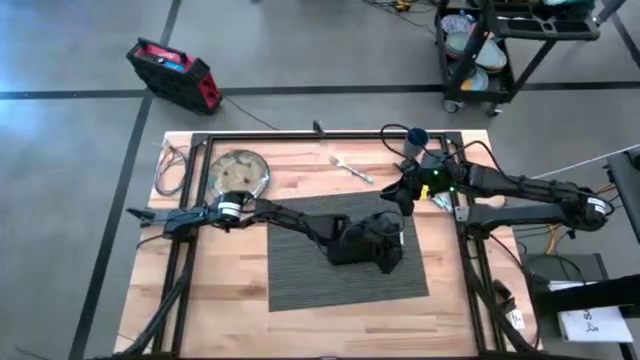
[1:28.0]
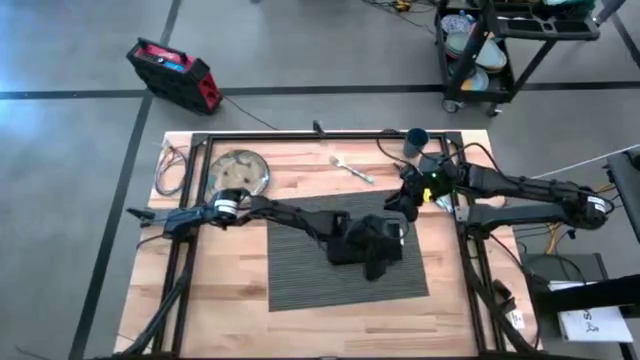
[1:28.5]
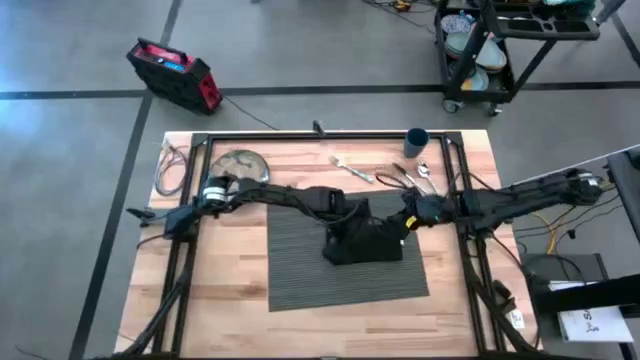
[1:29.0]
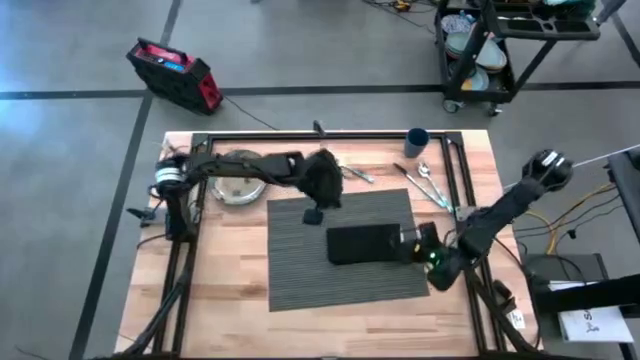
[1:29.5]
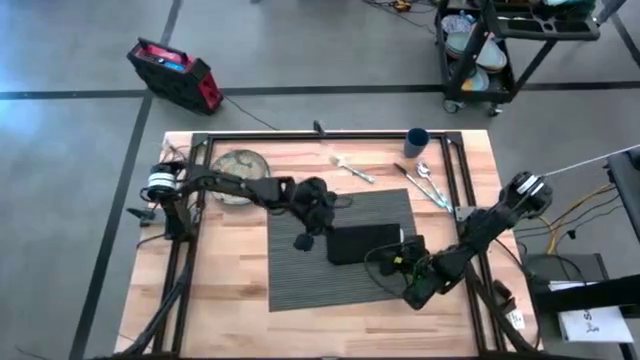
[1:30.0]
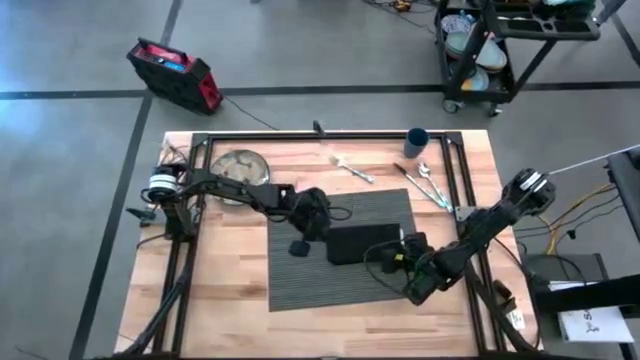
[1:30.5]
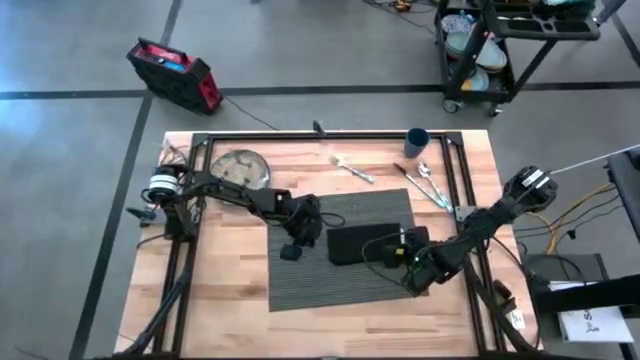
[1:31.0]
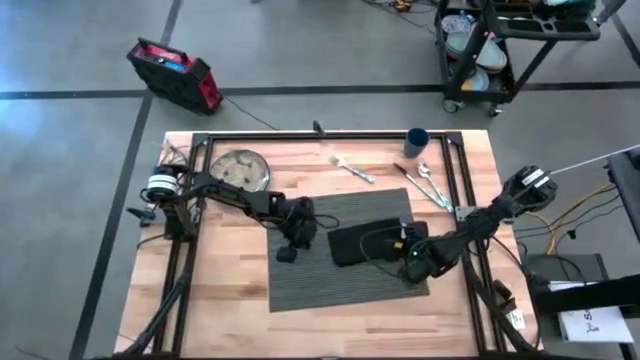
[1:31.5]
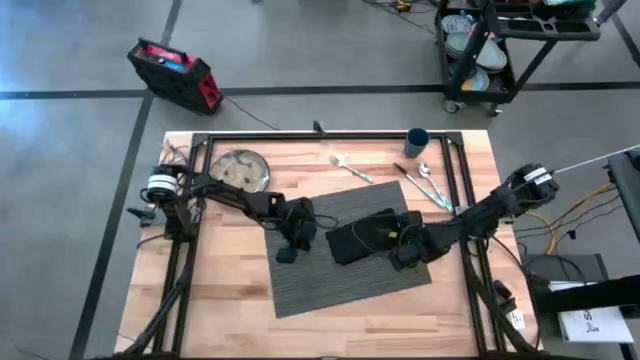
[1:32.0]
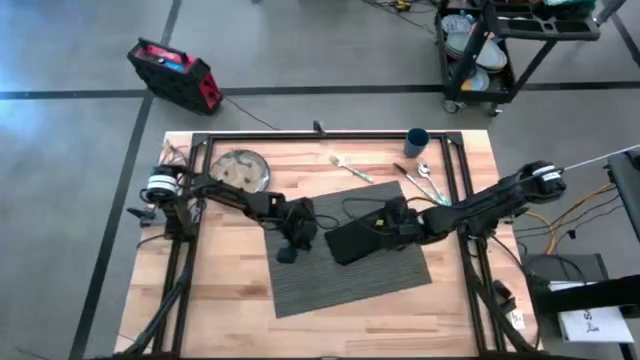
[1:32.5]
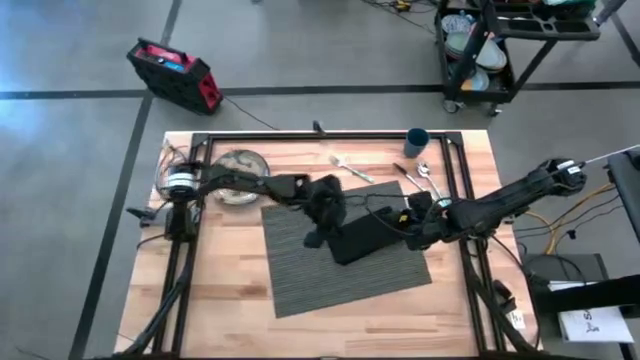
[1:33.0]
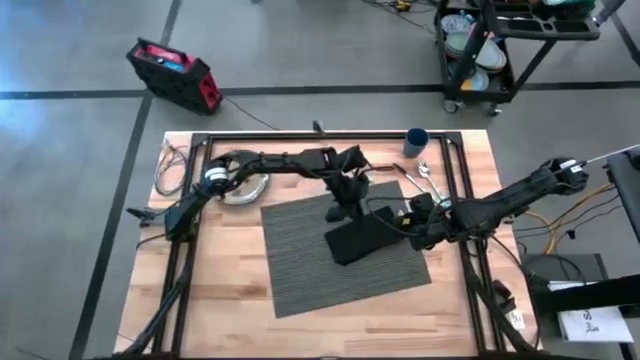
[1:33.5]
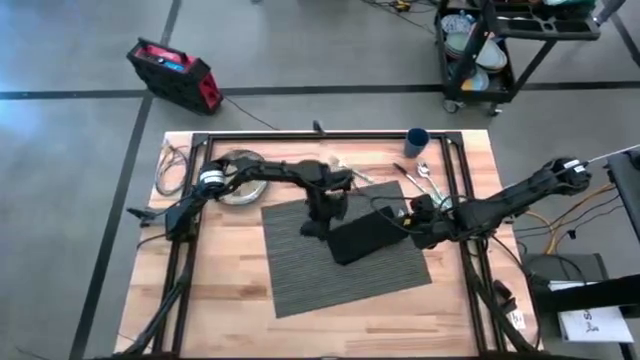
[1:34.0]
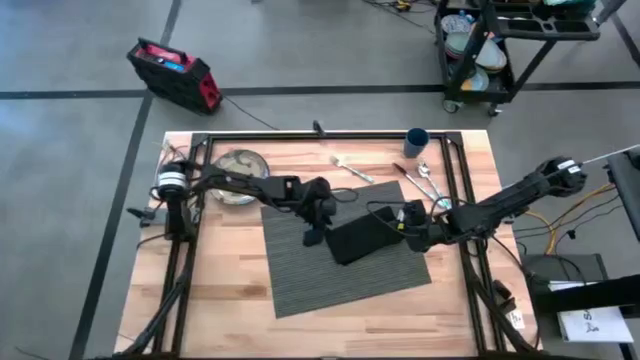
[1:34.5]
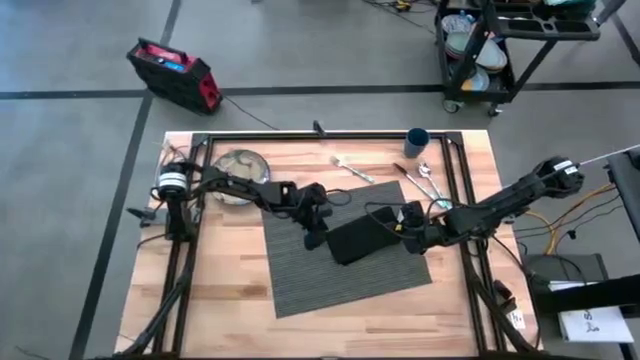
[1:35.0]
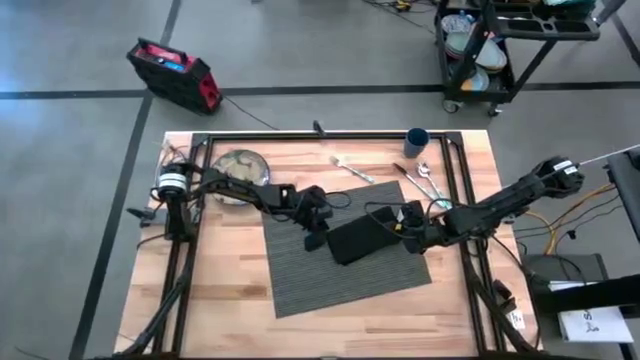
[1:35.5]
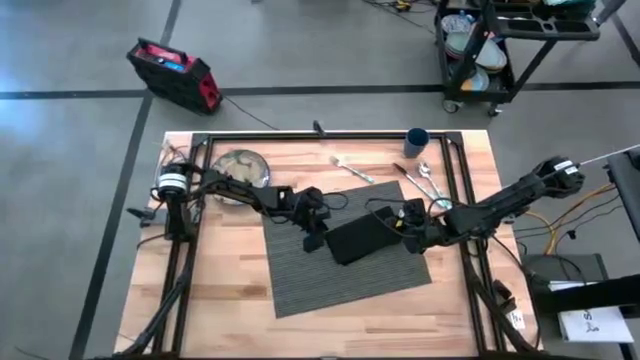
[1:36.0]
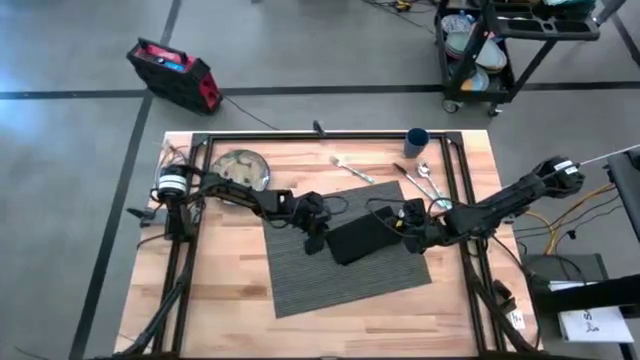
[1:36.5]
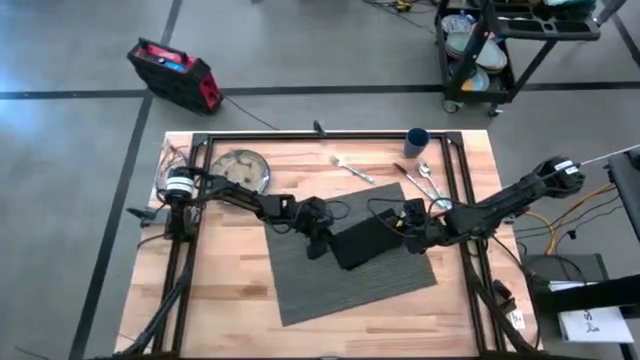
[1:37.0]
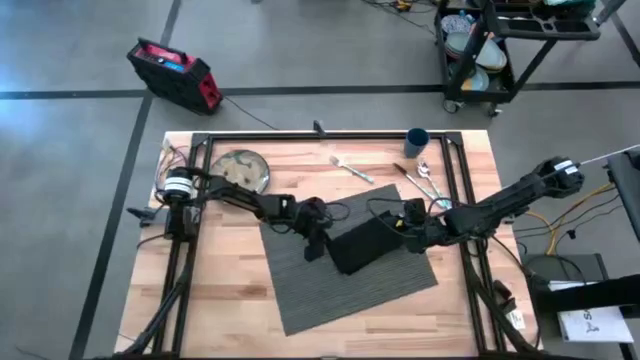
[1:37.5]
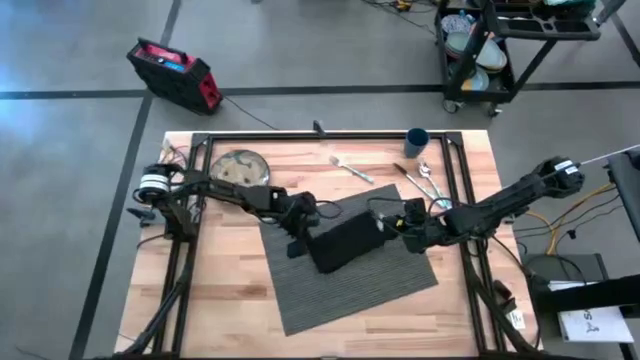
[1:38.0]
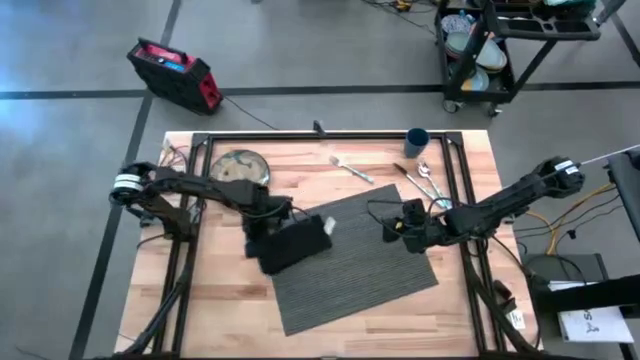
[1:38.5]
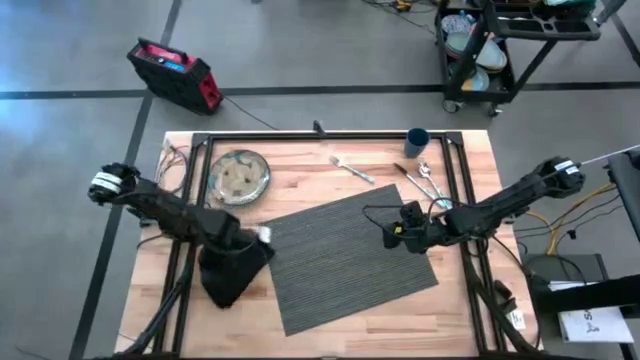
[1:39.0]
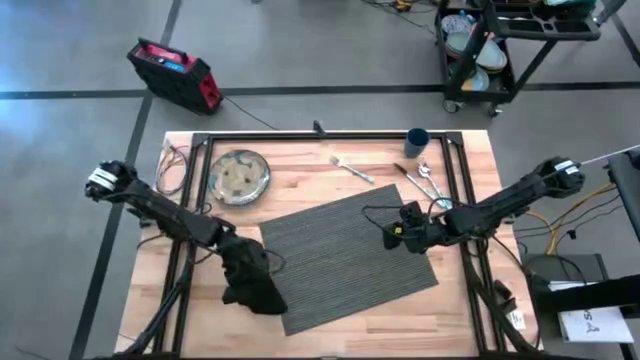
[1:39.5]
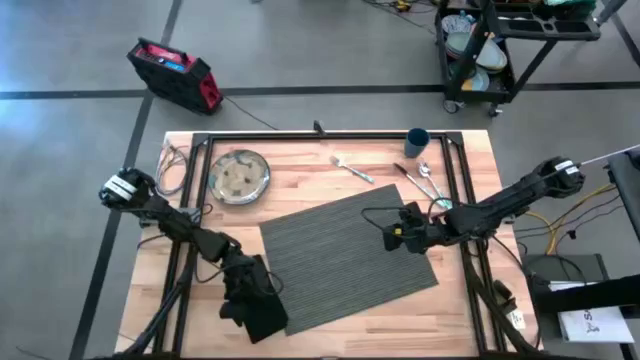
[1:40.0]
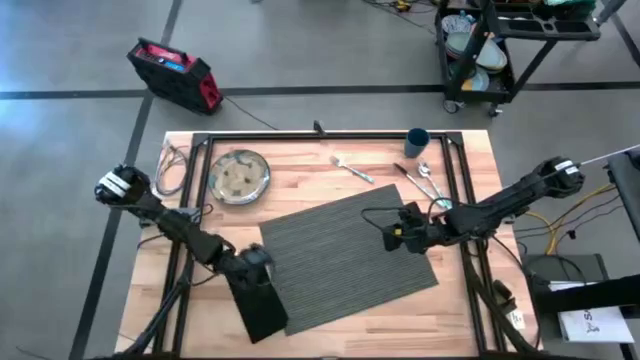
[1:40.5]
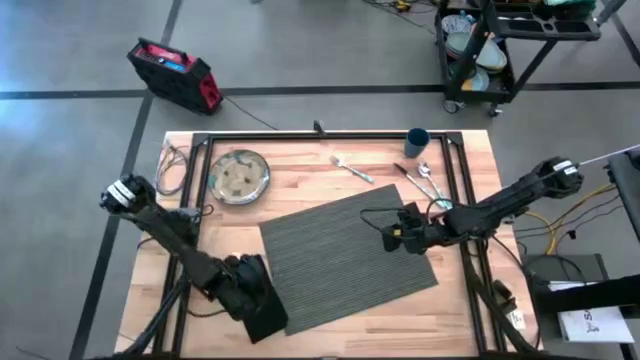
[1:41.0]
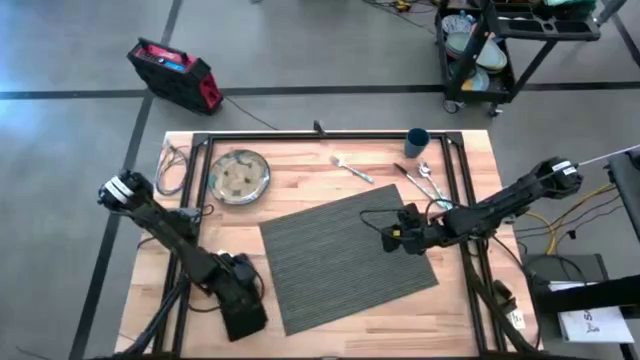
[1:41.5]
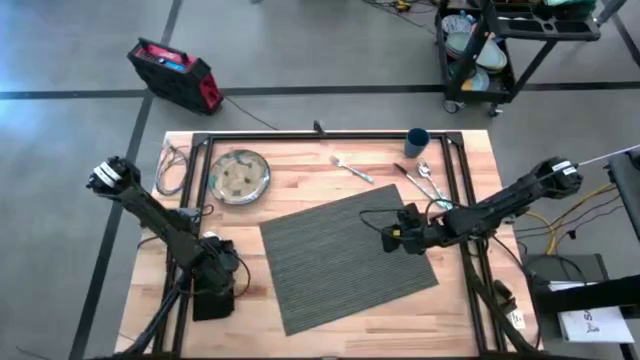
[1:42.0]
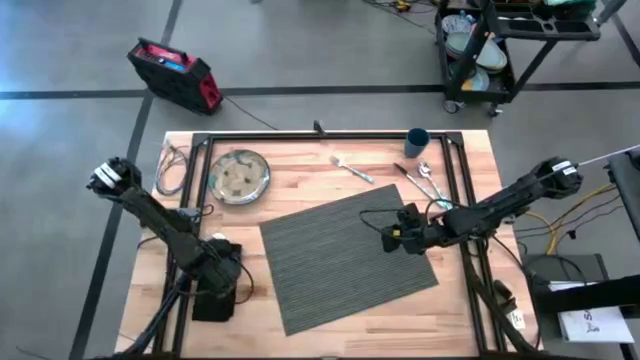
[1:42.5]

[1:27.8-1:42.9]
Task: Set table place
Move the black napkin to the middle left of the table

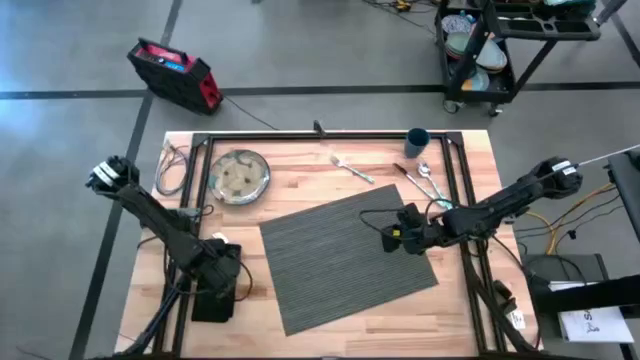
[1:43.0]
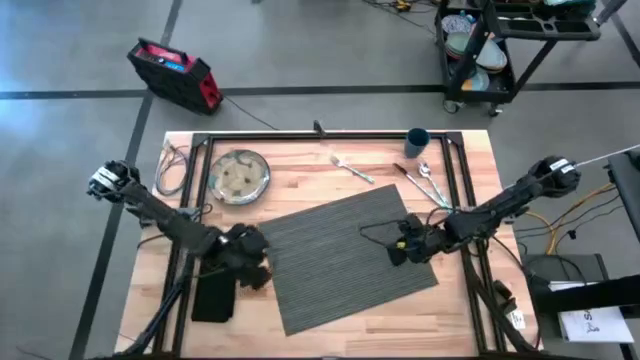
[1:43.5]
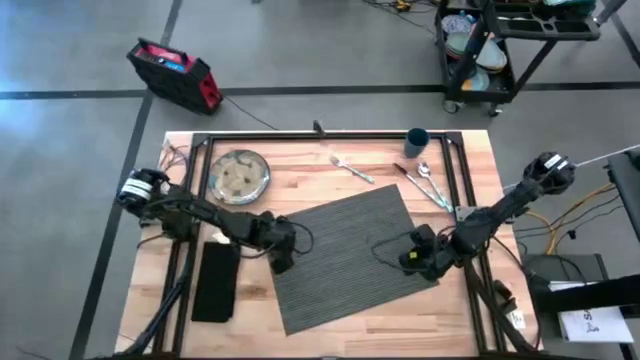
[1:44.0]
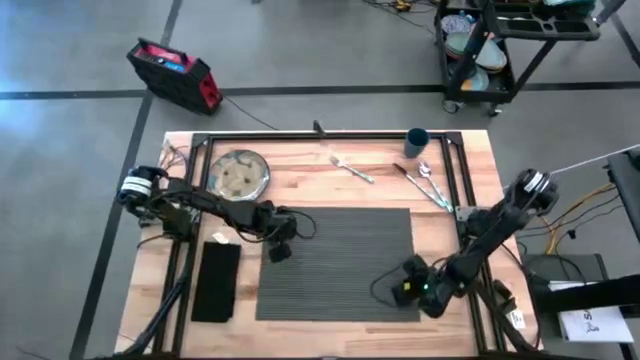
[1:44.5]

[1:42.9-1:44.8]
Adjust the dark blue table mat

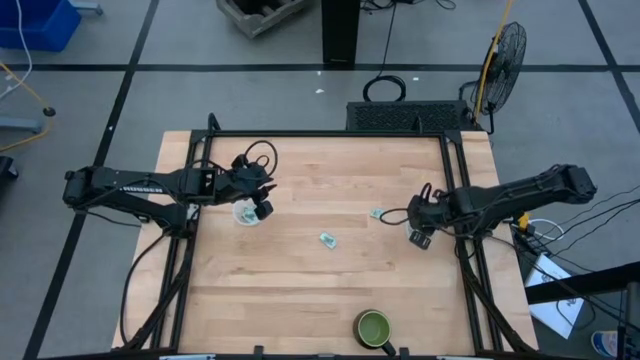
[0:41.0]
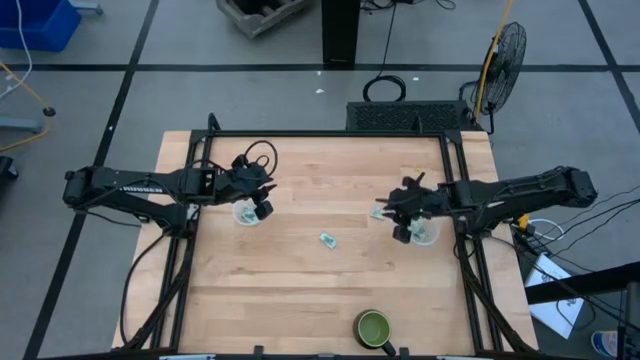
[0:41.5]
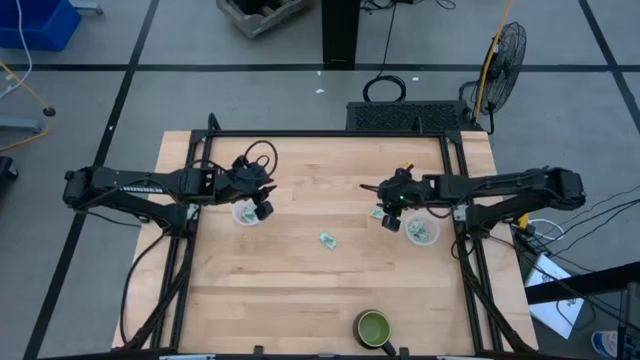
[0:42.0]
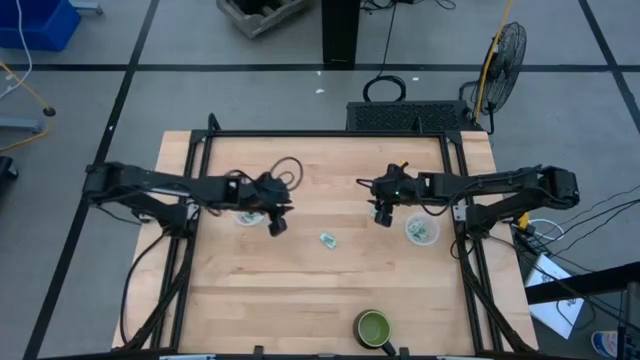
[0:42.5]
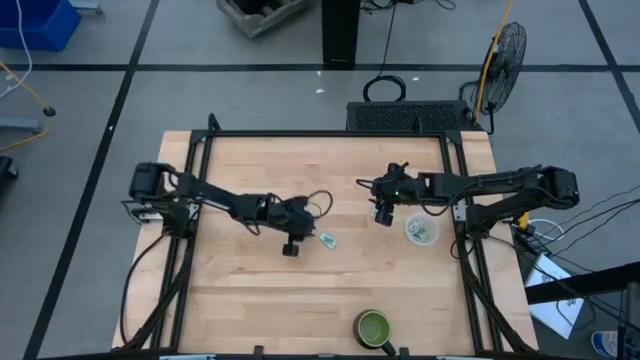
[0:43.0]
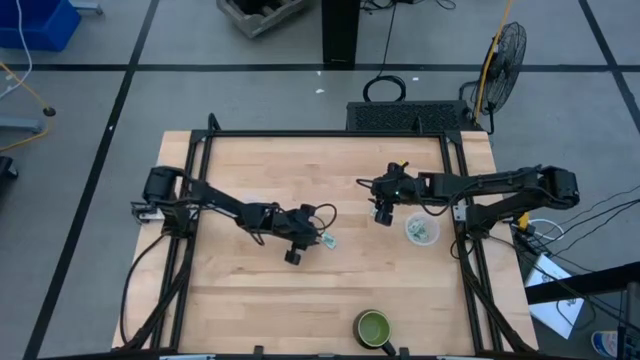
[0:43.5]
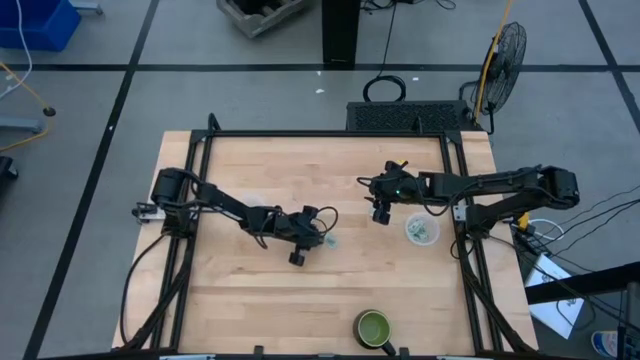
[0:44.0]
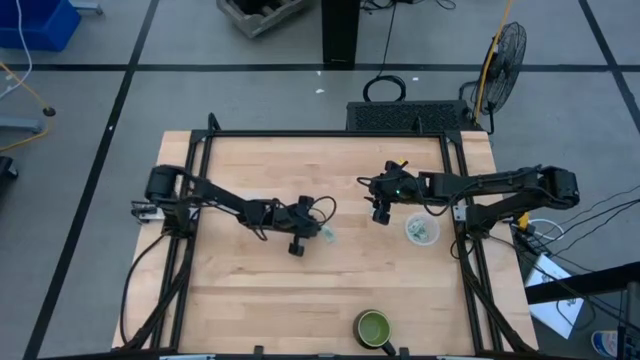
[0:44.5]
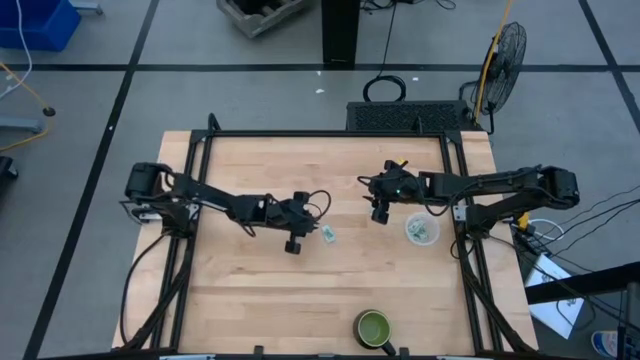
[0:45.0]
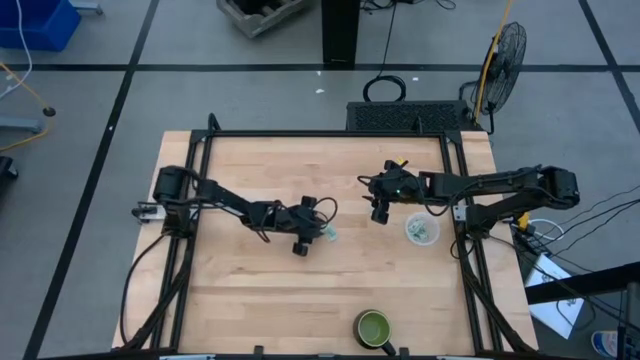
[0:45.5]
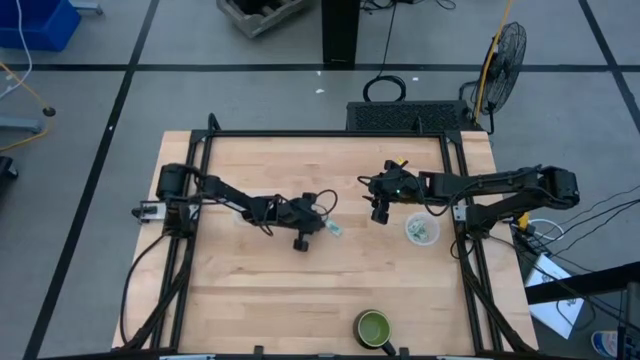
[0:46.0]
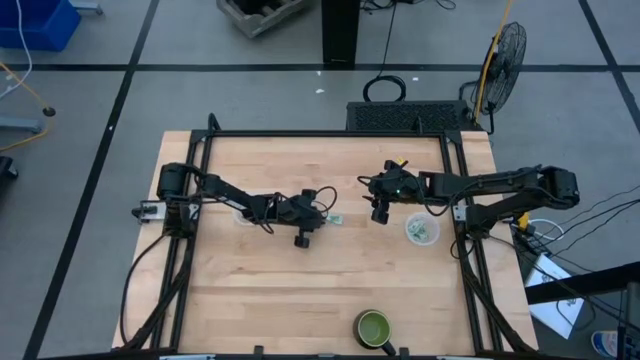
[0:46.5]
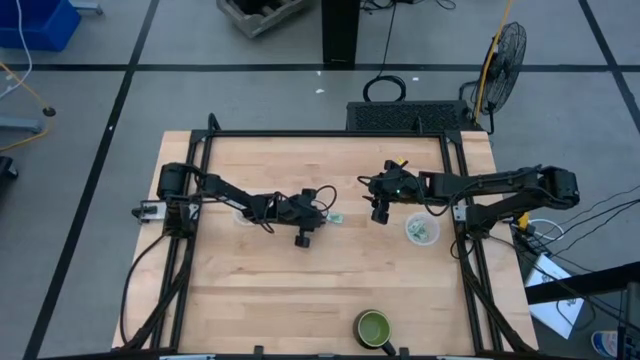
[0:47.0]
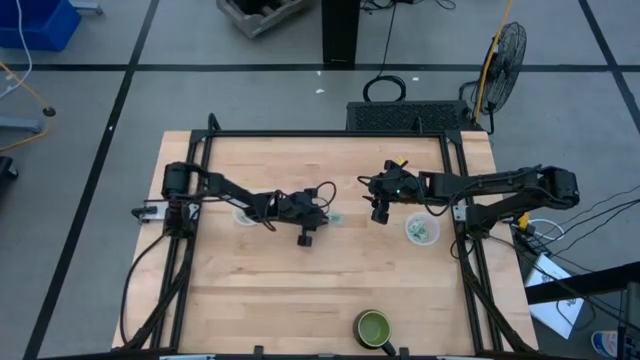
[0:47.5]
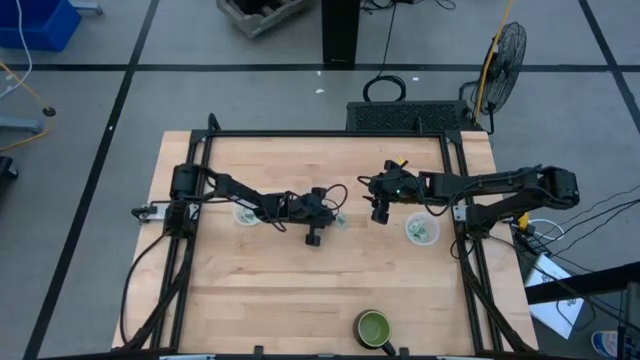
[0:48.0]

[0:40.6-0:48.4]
Task: Pick and place Stevia / Truvia into bins
Put the stevia packet into the left transparent container
